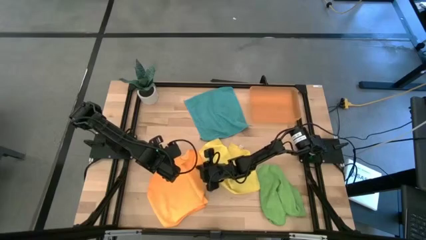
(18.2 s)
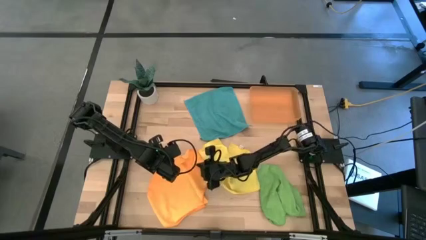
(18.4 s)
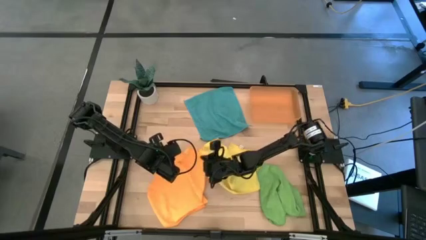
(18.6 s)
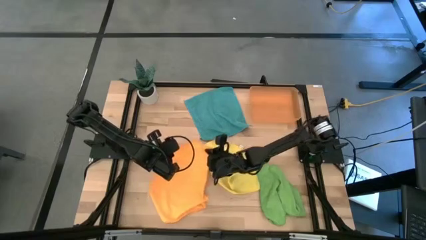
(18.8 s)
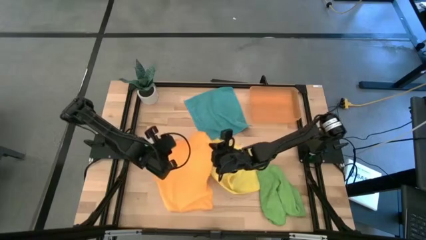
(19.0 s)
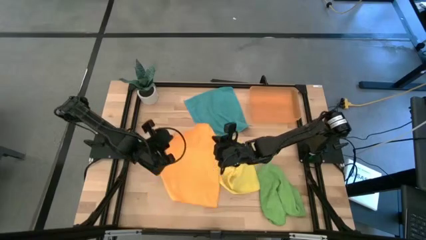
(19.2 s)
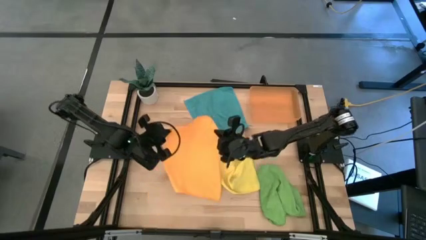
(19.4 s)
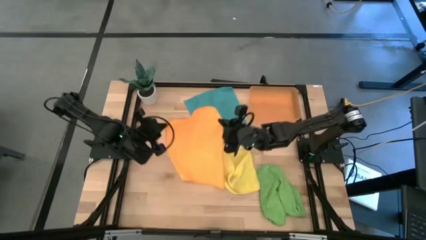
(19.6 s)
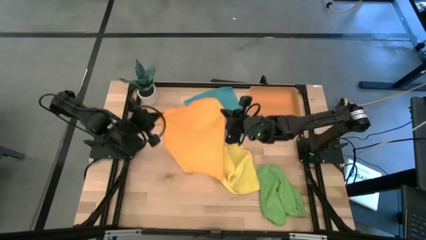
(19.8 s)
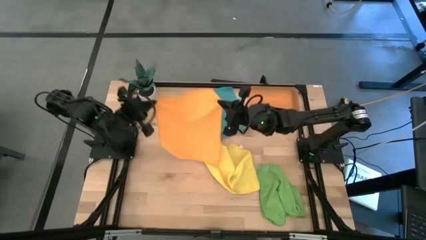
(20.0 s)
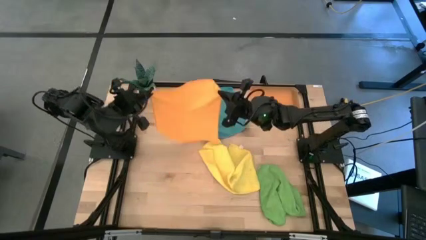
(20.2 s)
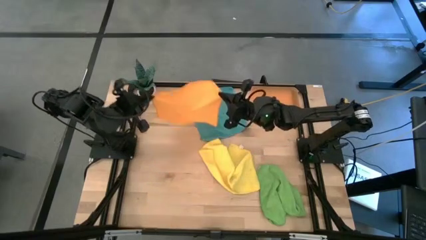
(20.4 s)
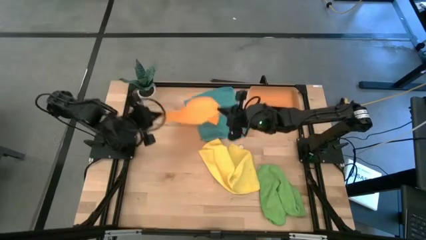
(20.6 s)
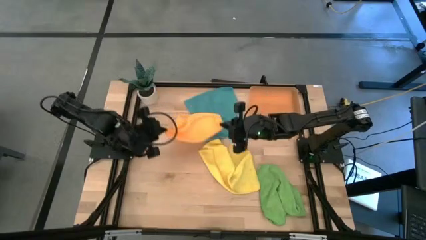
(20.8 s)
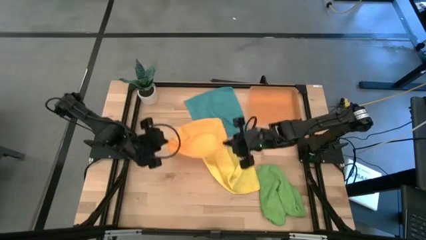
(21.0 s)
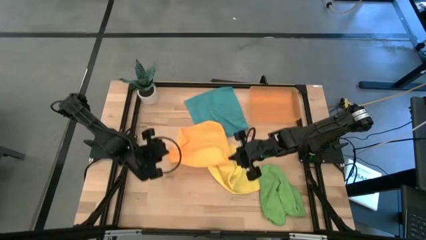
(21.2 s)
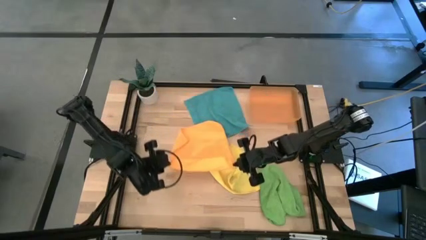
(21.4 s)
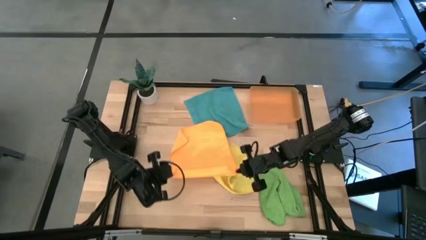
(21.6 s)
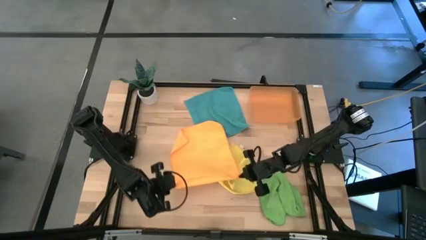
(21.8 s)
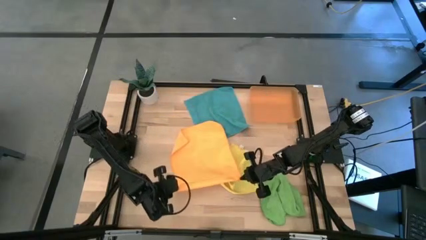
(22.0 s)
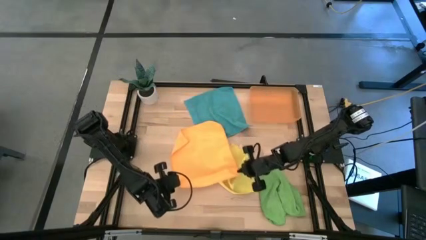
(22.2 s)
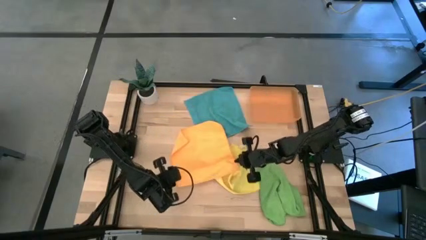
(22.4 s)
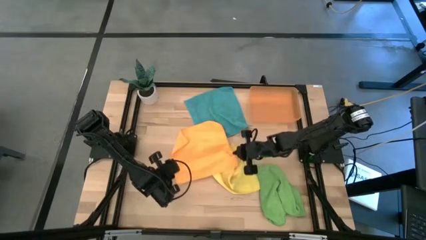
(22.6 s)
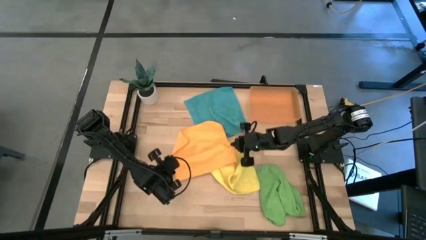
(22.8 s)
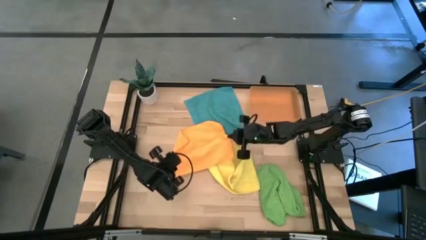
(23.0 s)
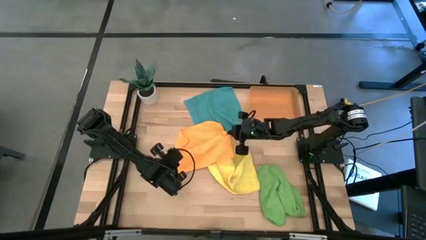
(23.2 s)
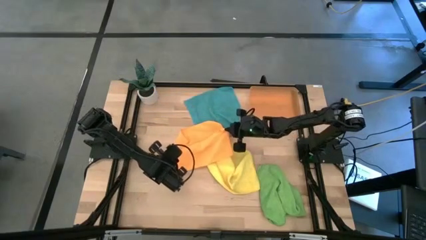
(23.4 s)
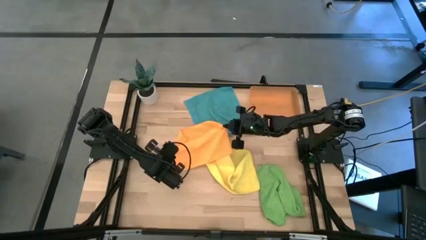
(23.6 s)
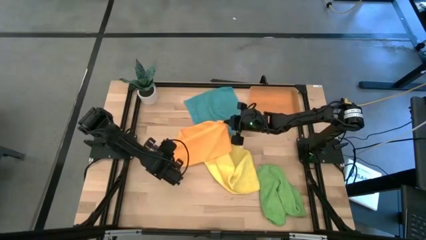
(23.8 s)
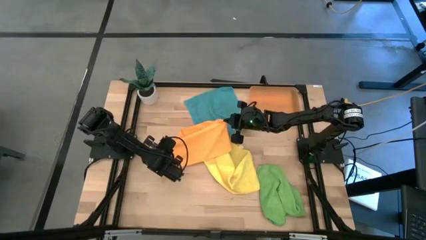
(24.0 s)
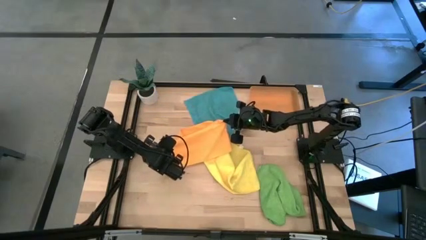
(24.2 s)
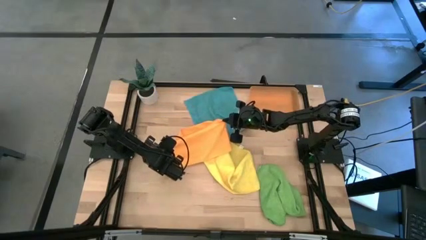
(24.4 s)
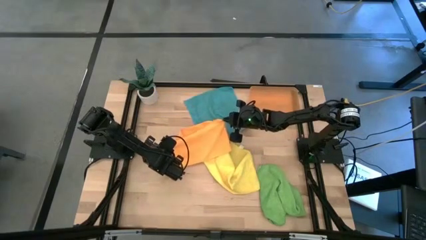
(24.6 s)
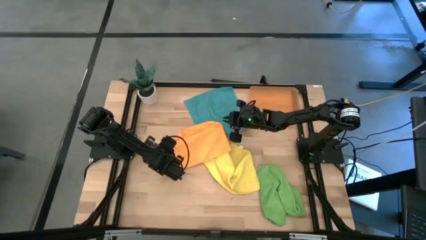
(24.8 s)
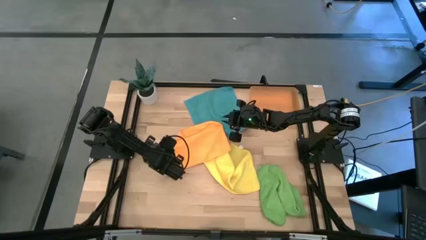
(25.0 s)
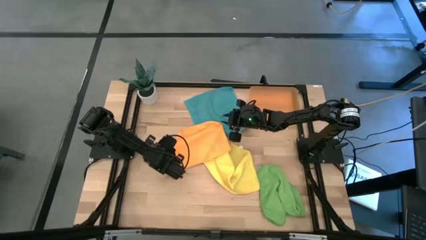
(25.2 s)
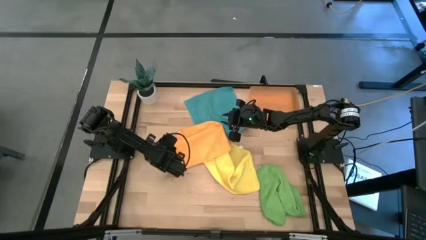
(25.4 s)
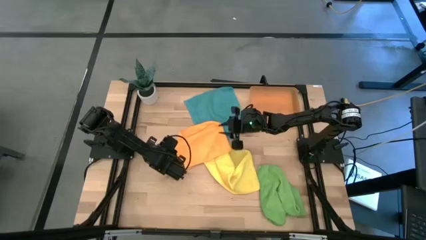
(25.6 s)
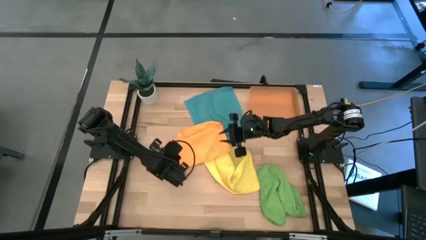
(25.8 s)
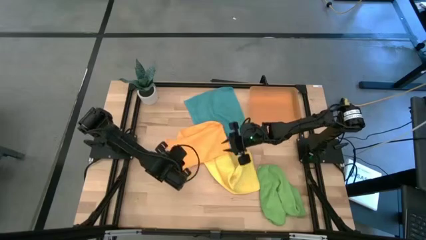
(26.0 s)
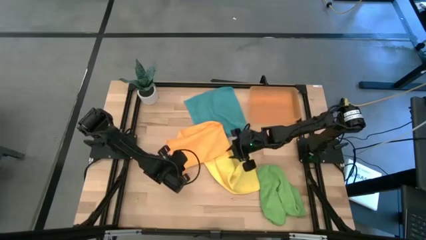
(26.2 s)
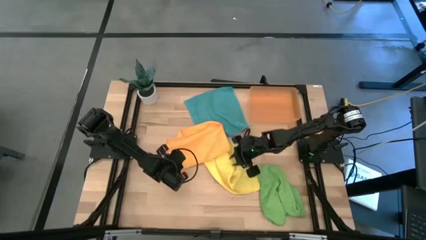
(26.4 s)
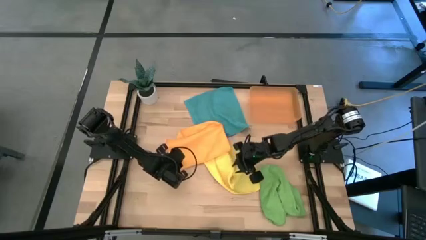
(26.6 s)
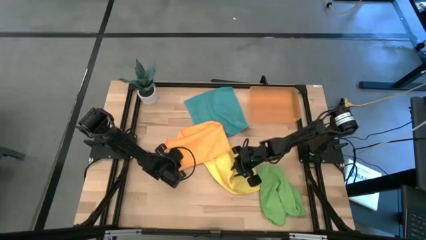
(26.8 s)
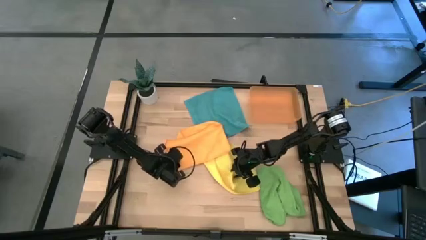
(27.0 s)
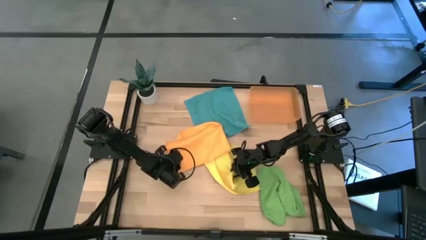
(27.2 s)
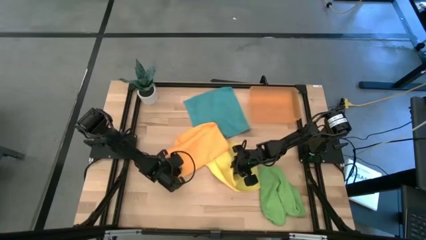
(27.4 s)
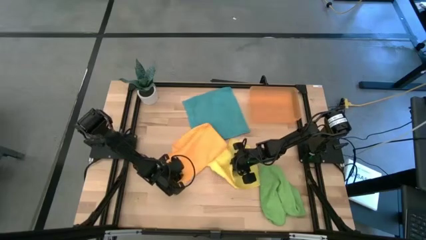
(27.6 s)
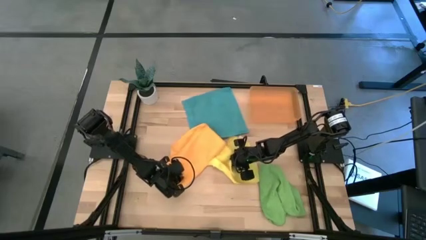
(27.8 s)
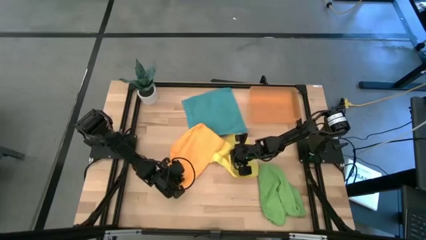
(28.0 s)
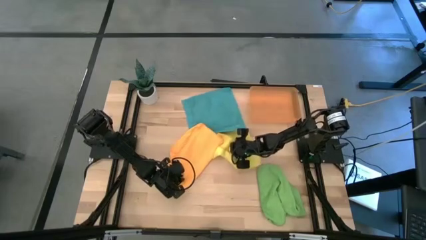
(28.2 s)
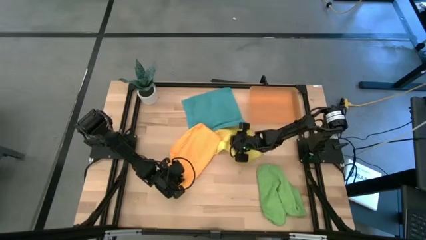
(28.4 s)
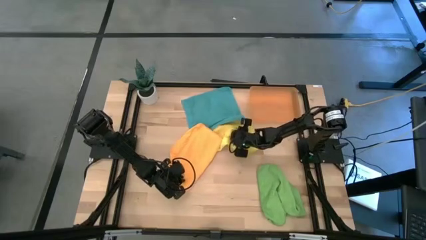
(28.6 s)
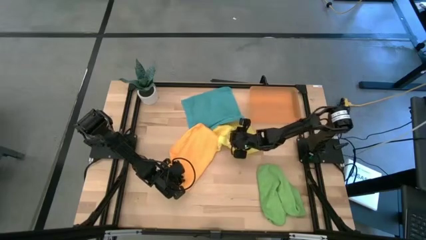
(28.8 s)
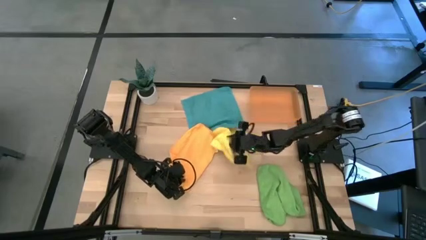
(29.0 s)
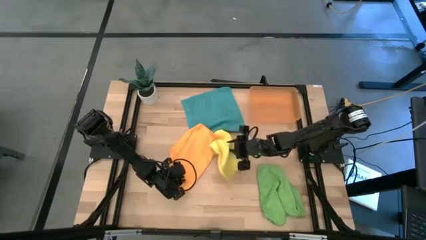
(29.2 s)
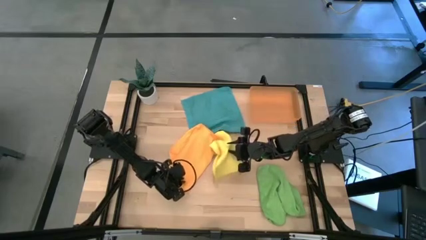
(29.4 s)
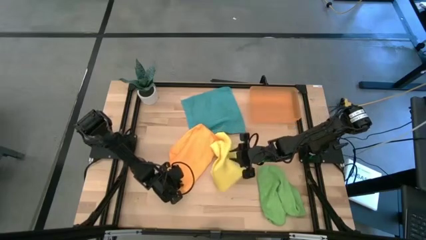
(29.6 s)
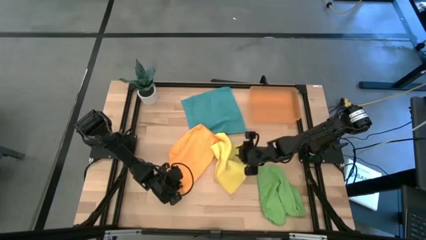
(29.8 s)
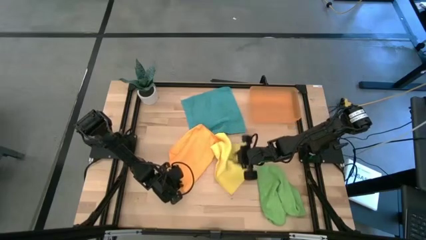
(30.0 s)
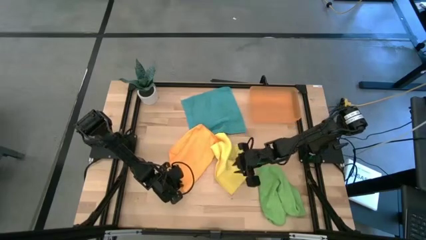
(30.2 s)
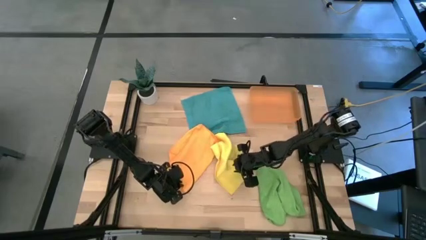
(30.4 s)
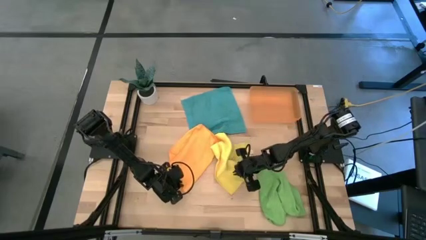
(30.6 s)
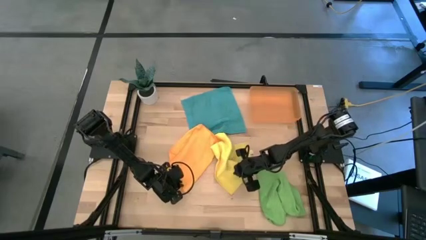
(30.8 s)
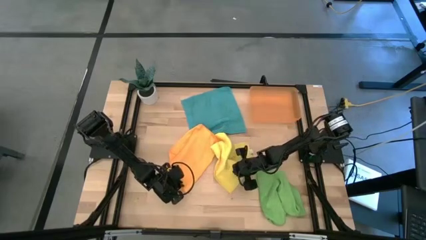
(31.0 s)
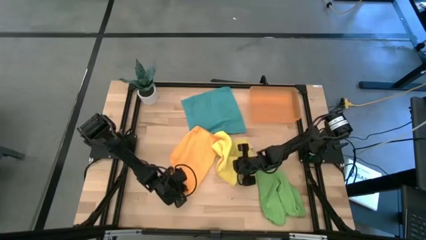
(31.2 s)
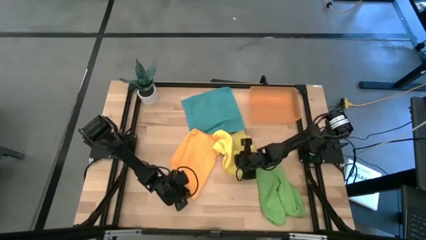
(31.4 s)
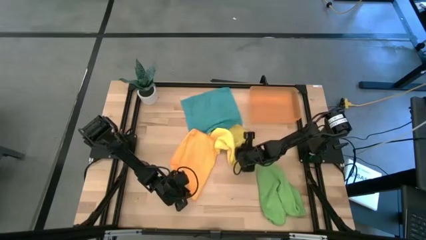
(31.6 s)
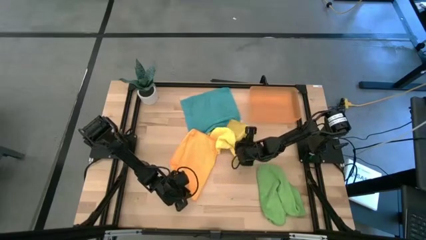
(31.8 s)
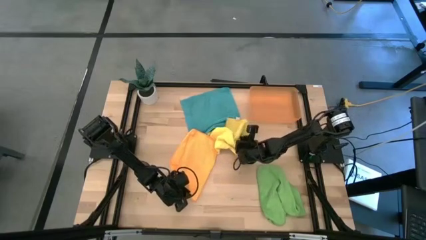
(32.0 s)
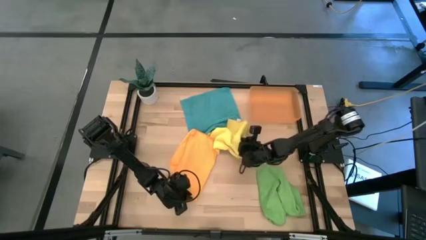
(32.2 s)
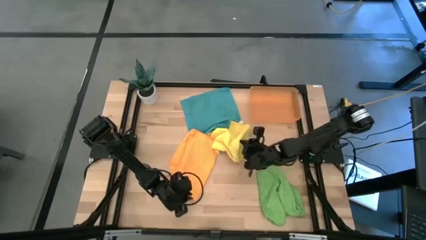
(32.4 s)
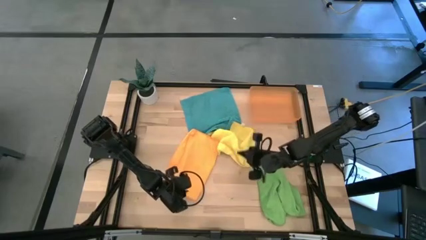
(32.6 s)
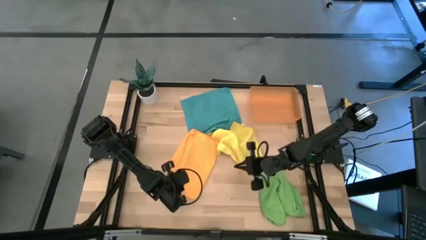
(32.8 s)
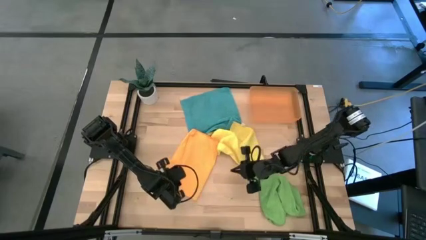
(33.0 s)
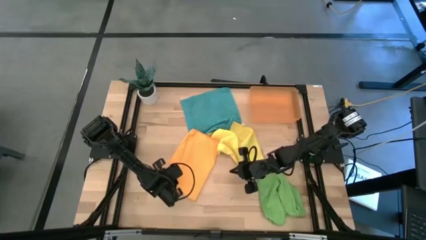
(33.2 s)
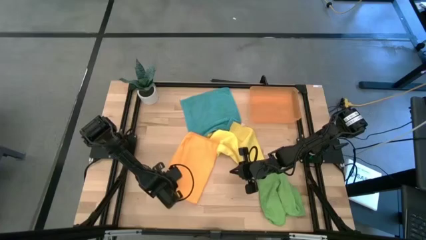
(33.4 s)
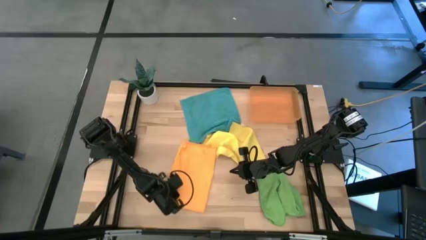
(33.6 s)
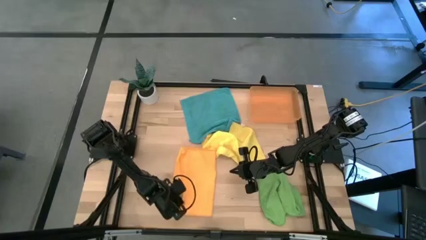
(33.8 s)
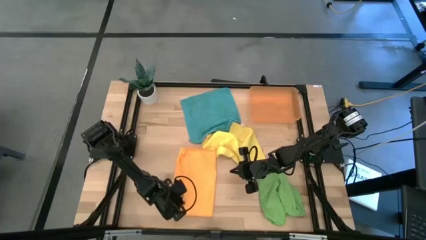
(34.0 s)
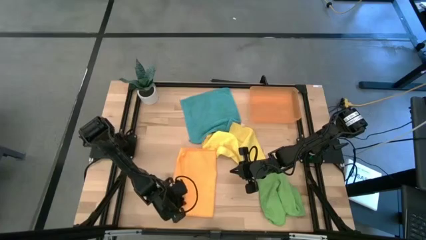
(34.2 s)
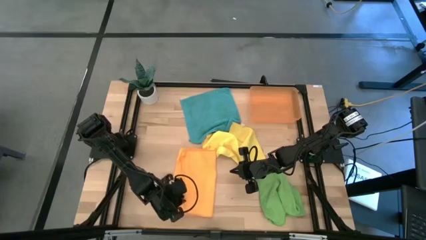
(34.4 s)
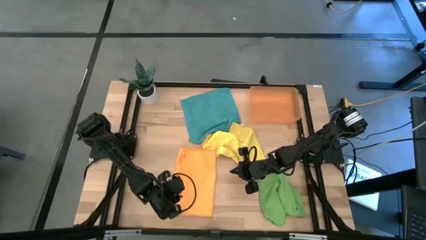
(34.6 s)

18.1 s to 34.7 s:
Task: Roll microfiber towels into tight, uniform cylinder then place into a basket
Roll the orange microfiber towel
